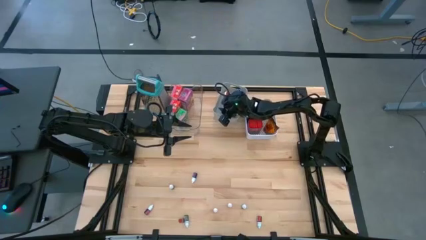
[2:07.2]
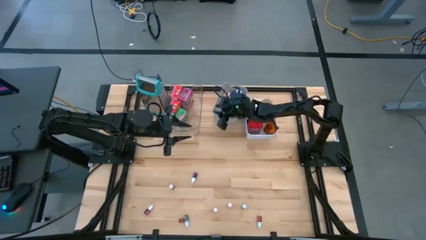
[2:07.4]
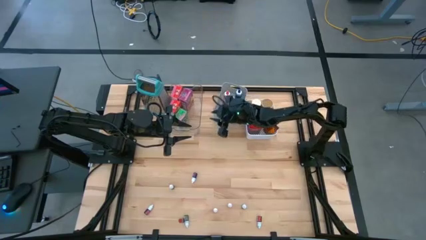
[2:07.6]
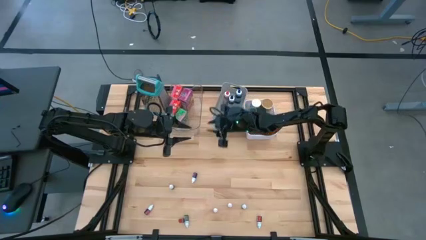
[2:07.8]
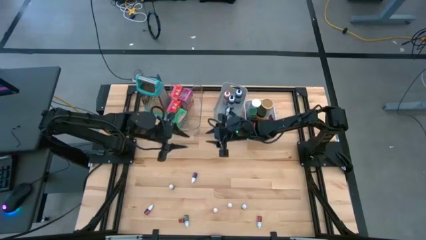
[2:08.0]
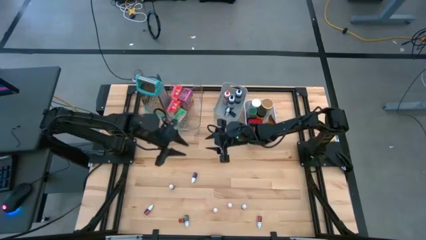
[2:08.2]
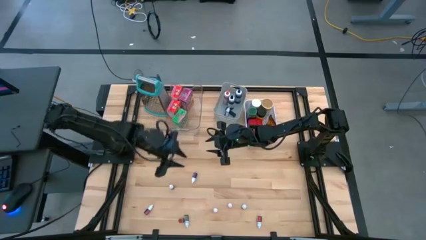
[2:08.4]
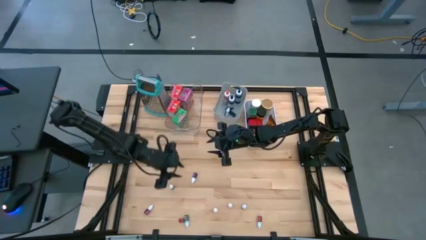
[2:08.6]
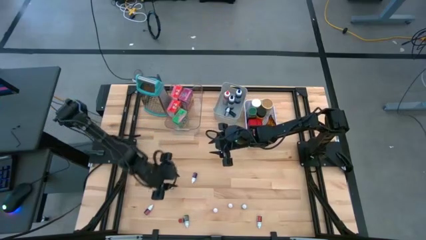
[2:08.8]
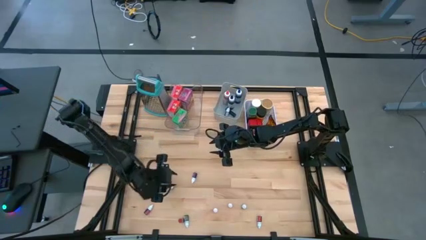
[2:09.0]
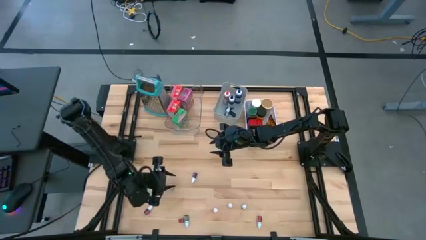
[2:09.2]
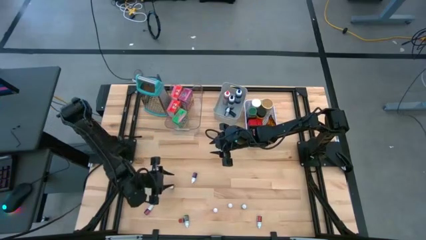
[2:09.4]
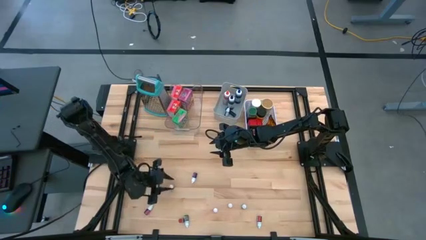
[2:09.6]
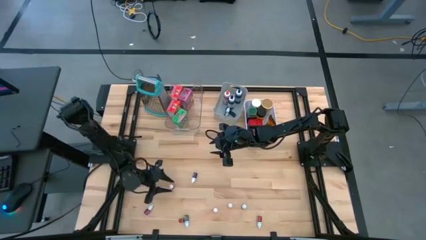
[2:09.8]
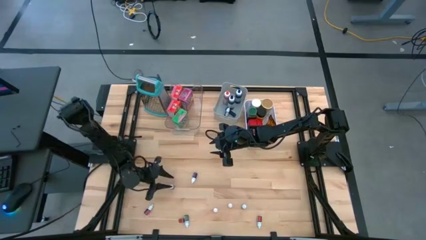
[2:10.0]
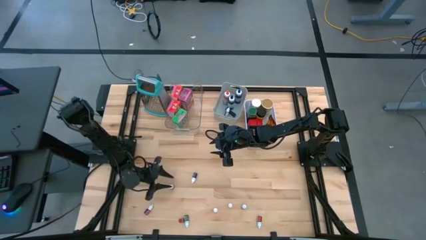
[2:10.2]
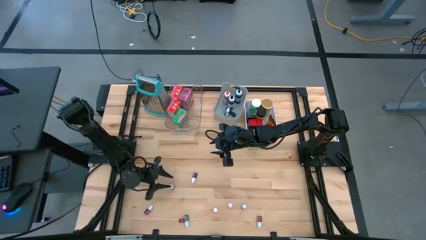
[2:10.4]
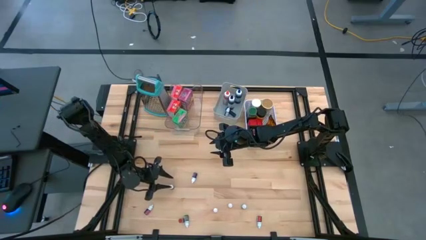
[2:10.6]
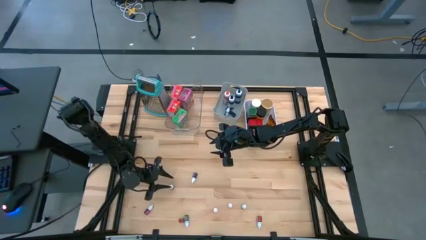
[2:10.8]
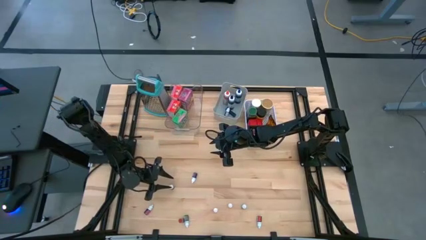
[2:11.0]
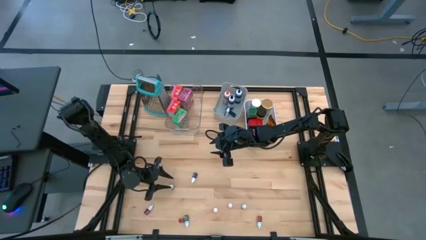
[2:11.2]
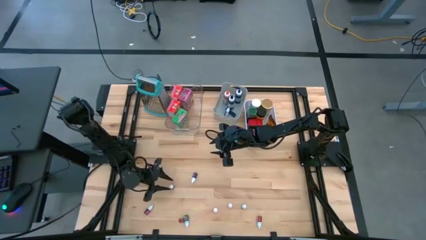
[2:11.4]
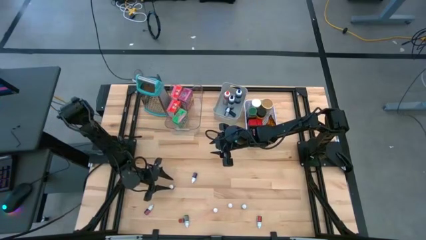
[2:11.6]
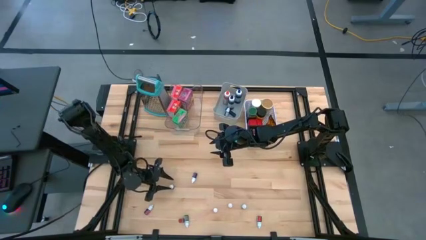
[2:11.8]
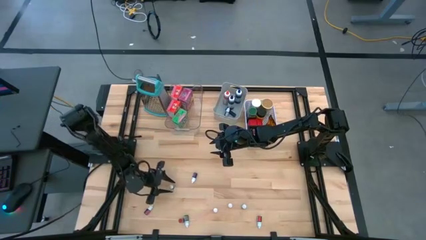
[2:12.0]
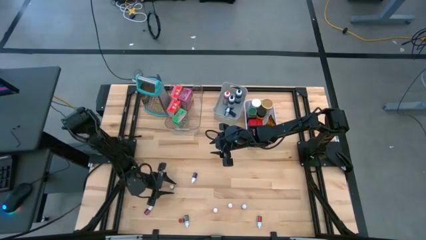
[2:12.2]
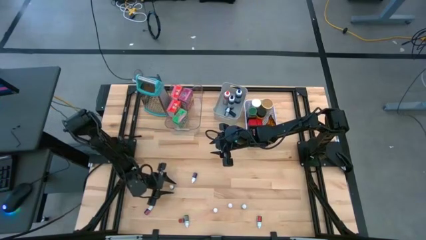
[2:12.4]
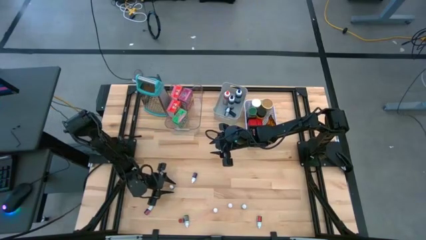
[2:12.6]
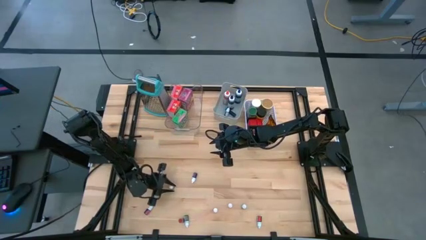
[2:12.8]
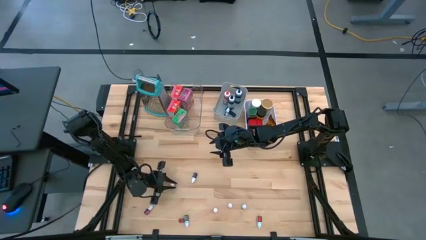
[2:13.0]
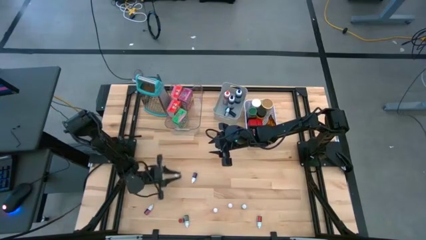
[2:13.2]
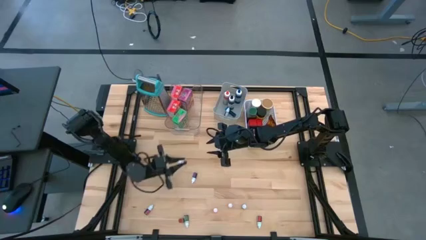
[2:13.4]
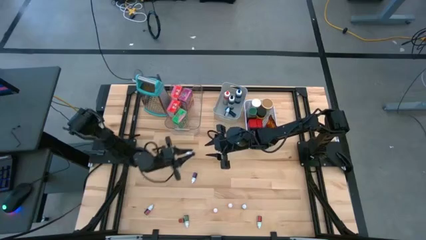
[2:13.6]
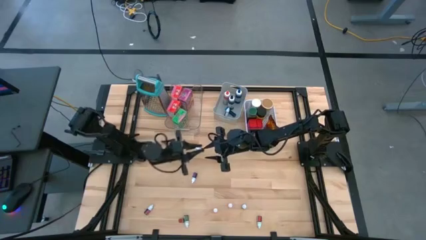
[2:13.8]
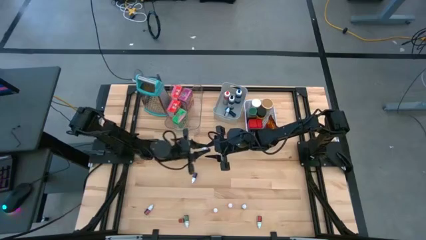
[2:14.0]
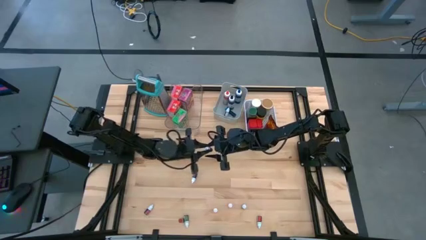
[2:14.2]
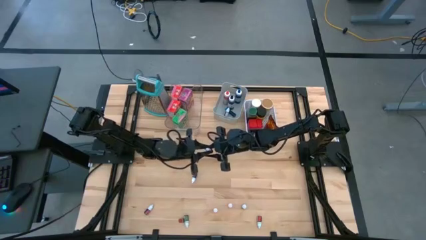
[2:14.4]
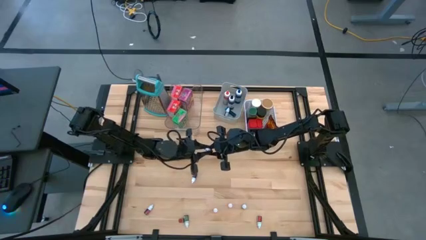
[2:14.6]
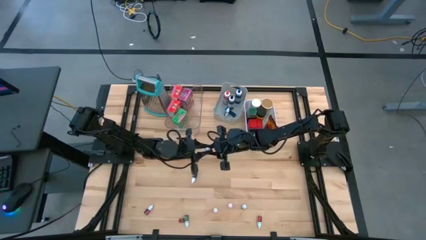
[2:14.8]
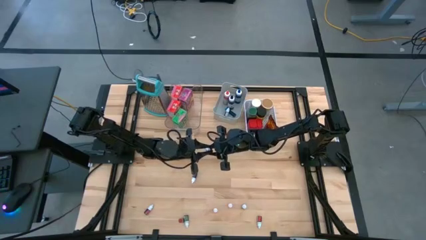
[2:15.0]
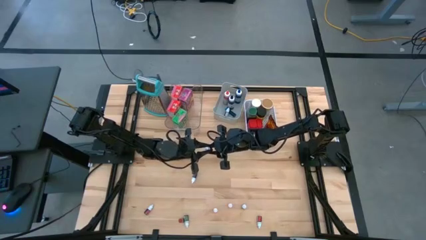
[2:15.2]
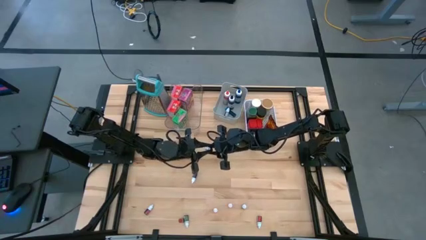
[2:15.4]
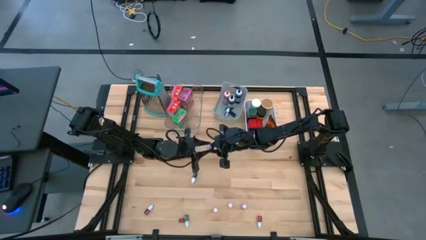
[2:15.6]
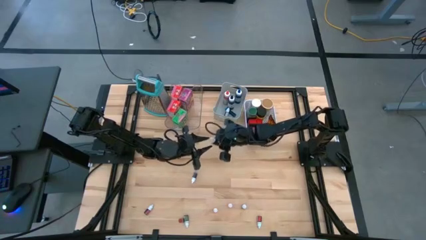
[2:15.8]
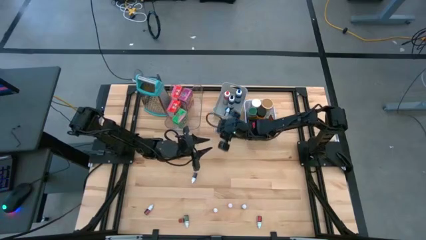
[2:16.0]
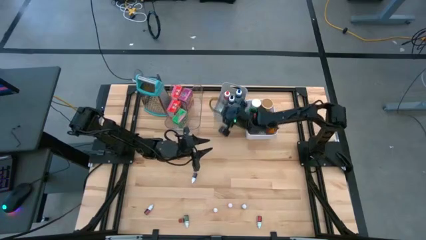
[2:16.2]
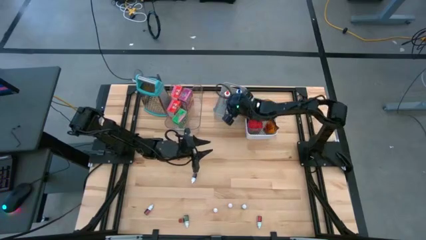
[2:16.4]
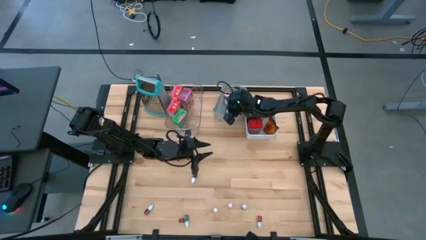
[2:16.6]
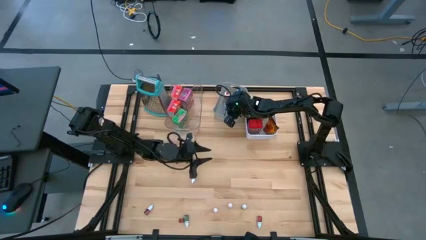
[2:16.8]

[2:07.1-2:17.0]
Task: Pick & Place Kitchen Items
Put the small brown food coloring bottle into the gray bin

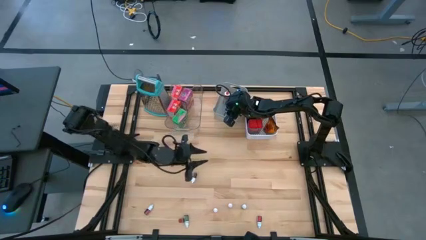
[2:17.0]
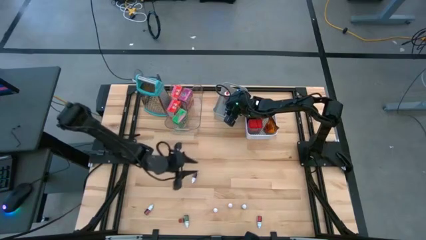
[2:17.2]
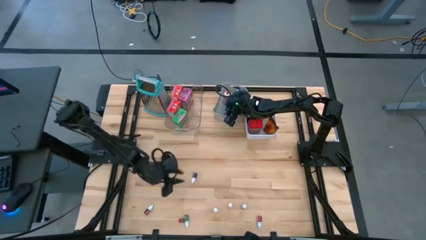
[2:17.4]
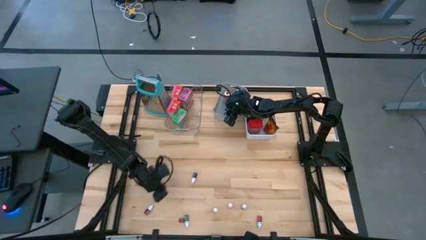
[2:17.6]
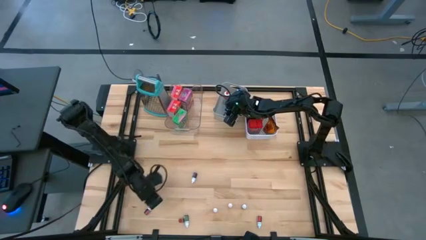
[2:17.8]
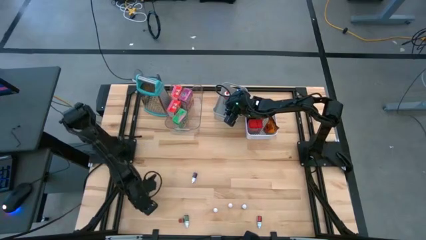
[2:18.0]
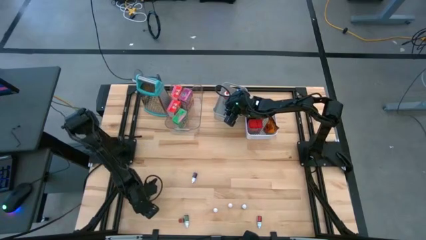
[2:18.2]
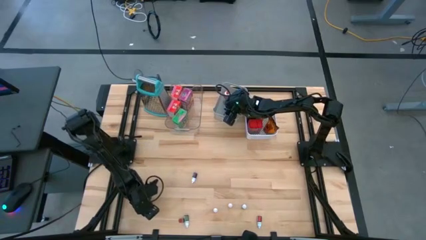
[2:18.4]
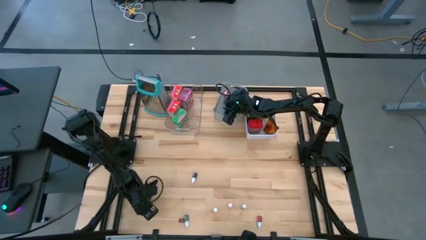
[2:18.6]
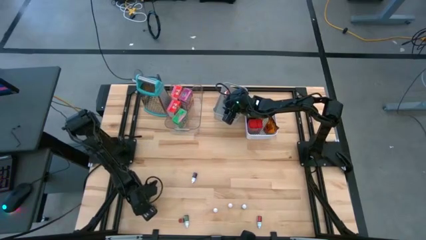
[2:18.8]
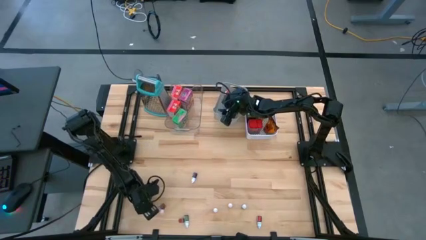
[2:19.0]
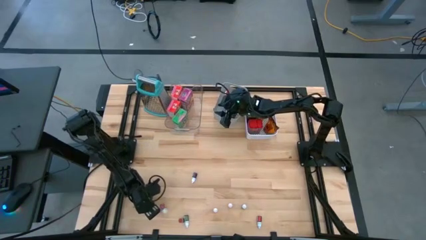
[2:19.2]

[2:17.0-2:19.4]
Put the small pink food coloring bottle into the gray bin
